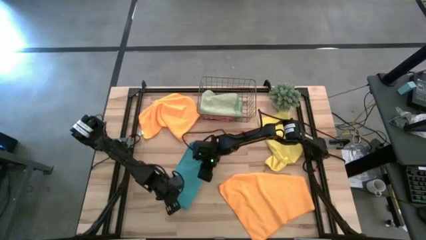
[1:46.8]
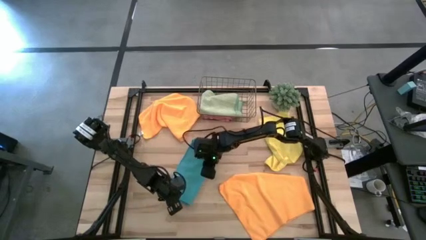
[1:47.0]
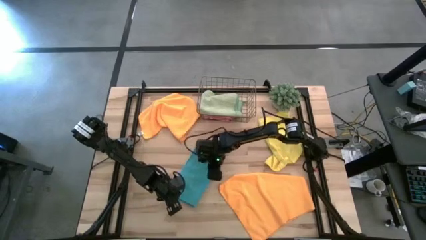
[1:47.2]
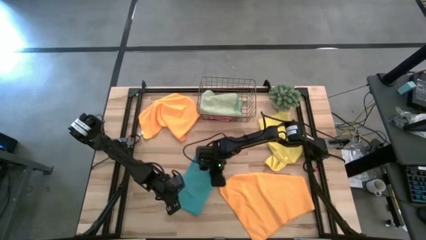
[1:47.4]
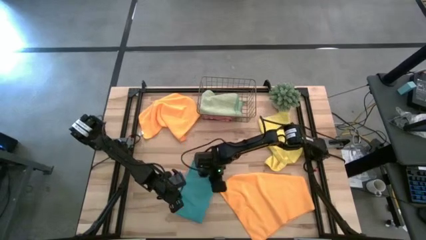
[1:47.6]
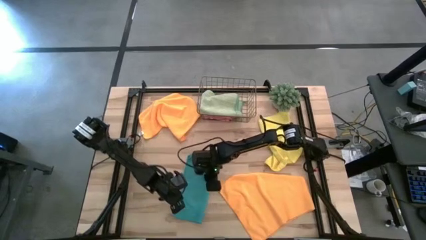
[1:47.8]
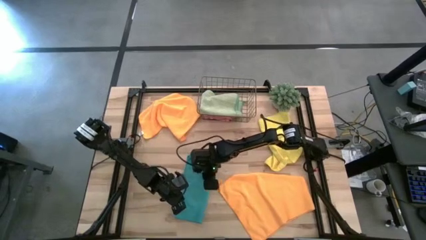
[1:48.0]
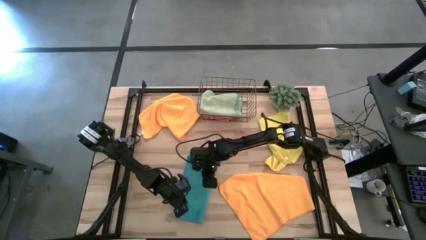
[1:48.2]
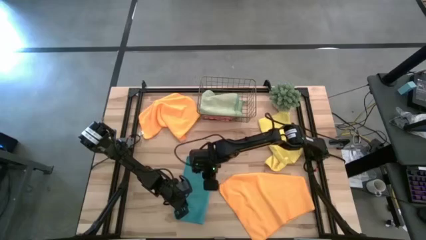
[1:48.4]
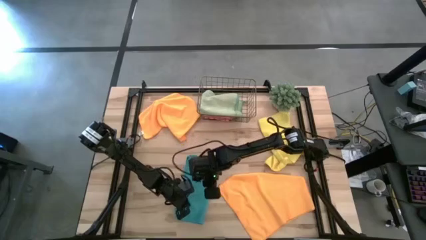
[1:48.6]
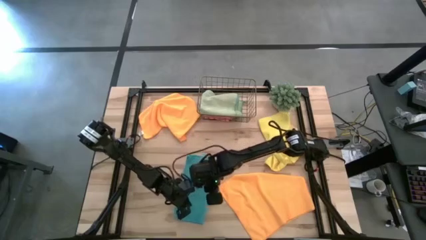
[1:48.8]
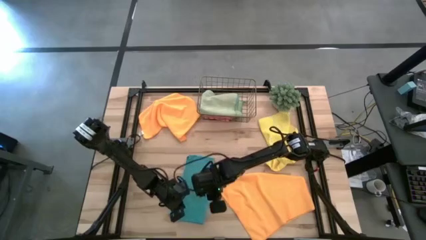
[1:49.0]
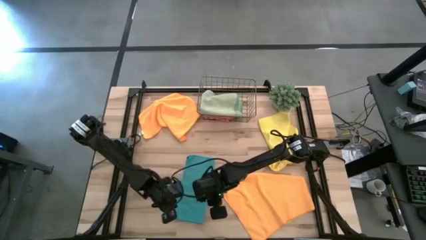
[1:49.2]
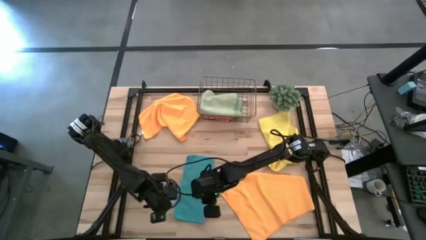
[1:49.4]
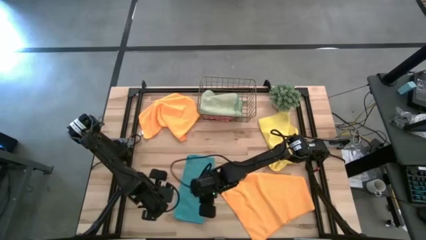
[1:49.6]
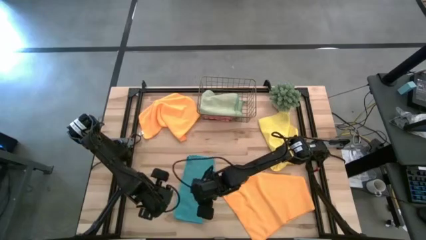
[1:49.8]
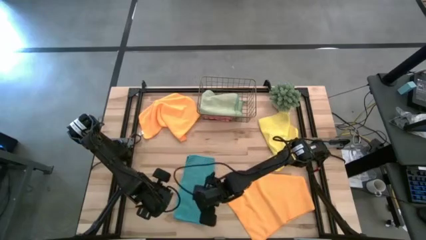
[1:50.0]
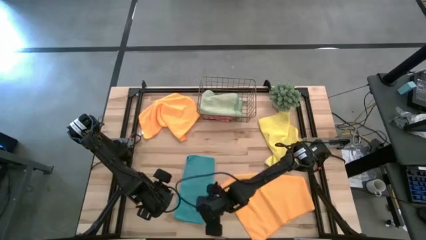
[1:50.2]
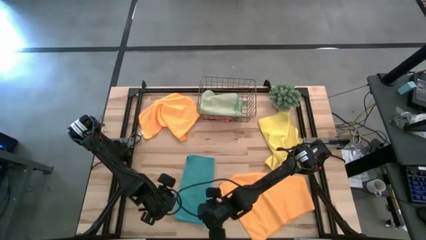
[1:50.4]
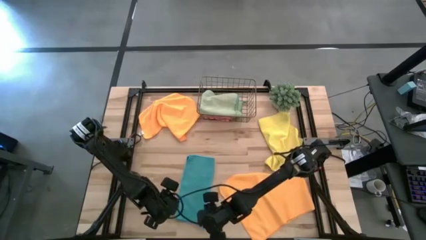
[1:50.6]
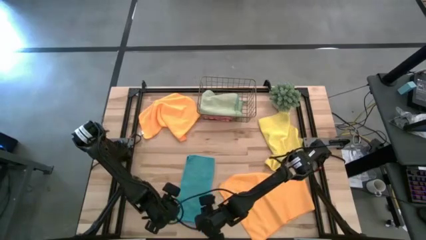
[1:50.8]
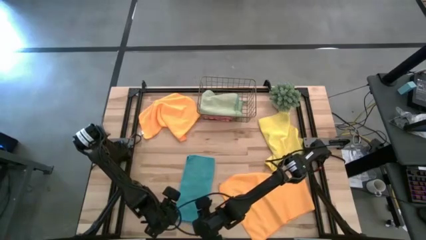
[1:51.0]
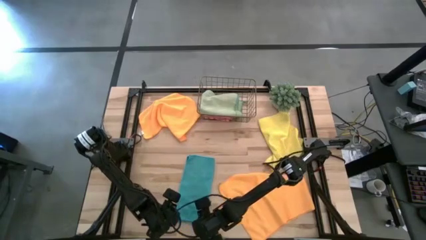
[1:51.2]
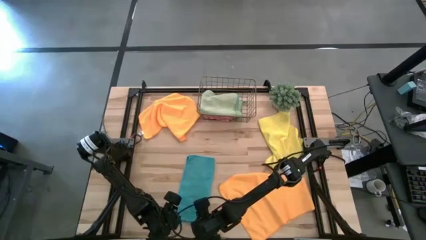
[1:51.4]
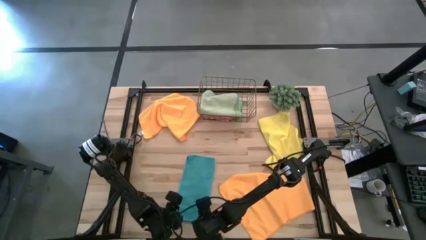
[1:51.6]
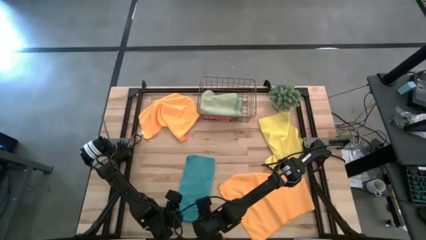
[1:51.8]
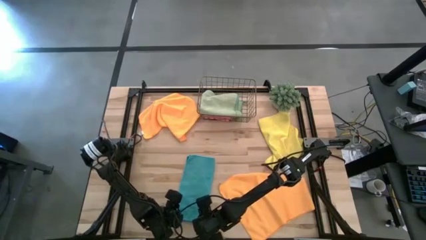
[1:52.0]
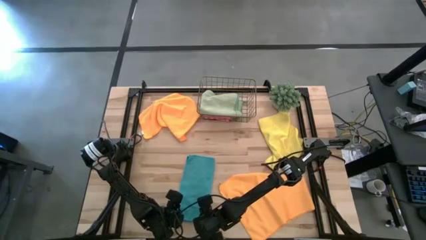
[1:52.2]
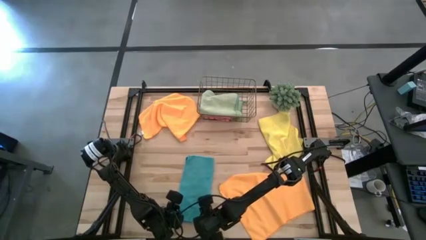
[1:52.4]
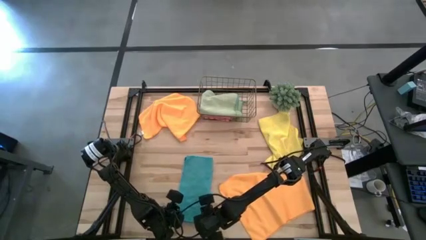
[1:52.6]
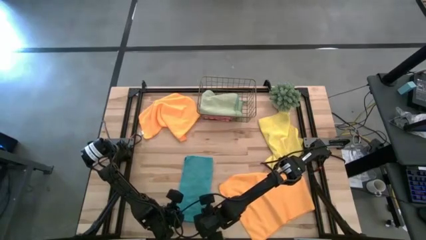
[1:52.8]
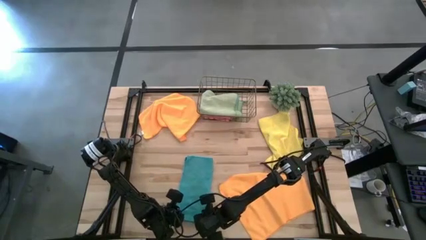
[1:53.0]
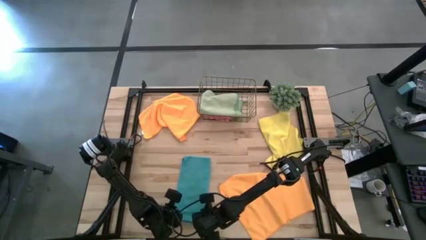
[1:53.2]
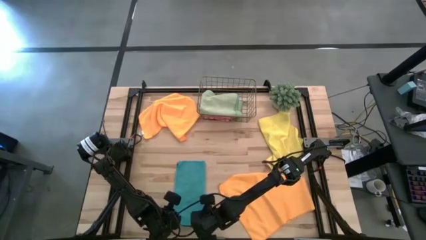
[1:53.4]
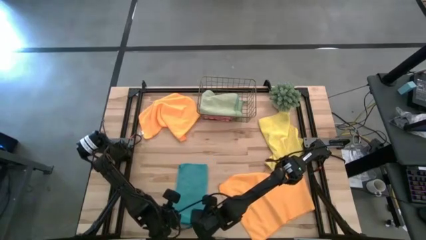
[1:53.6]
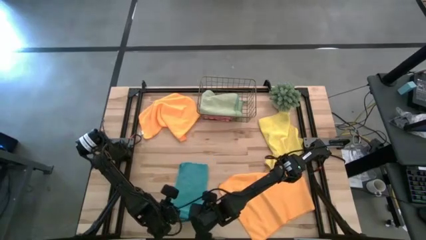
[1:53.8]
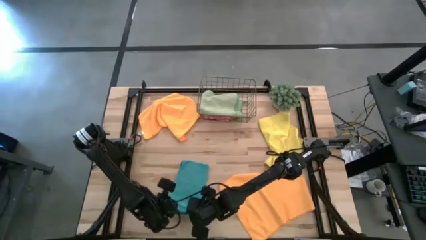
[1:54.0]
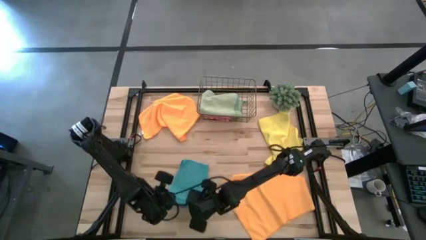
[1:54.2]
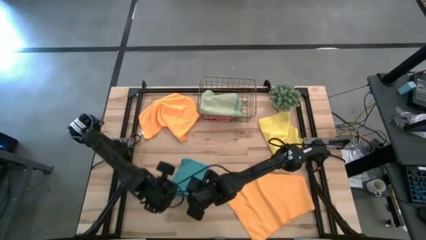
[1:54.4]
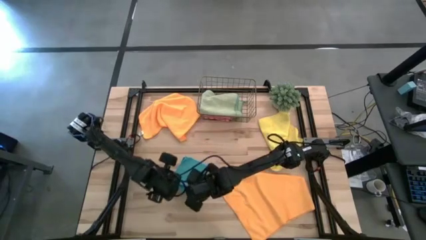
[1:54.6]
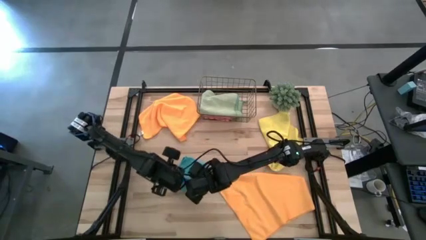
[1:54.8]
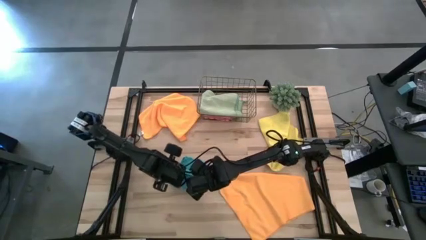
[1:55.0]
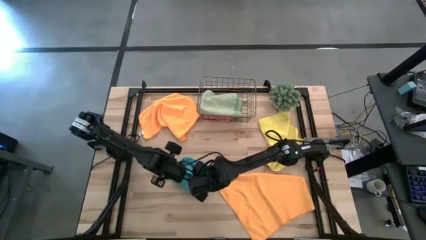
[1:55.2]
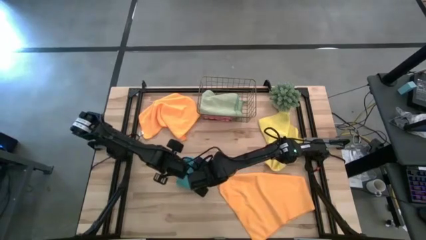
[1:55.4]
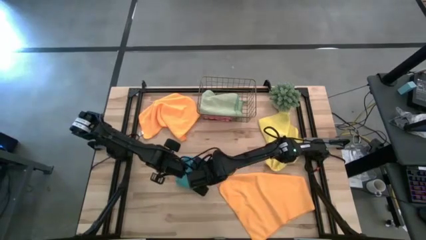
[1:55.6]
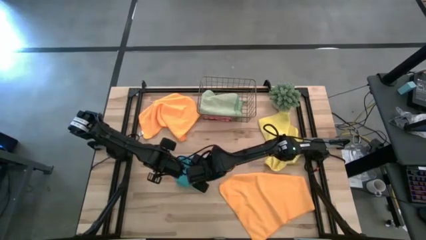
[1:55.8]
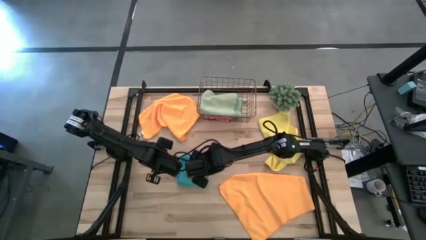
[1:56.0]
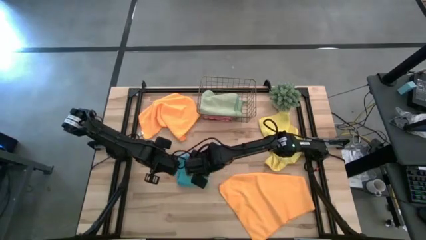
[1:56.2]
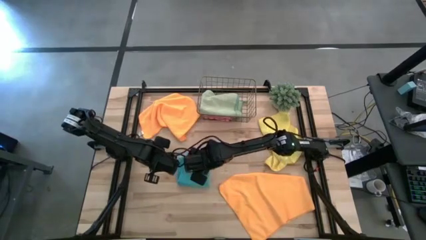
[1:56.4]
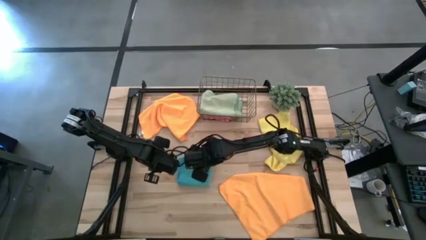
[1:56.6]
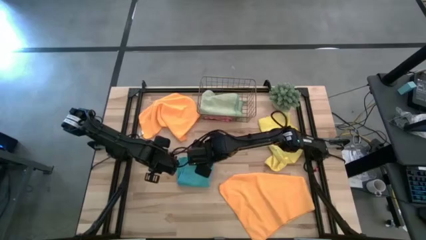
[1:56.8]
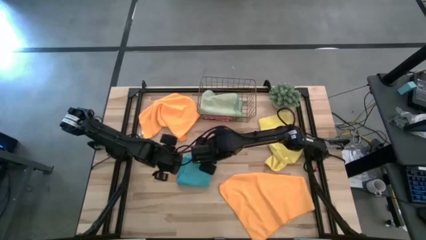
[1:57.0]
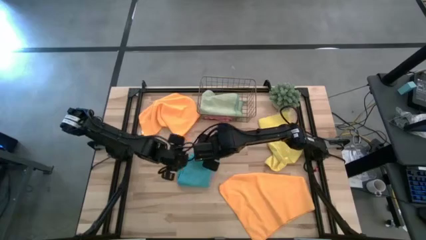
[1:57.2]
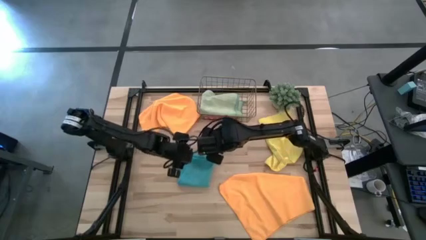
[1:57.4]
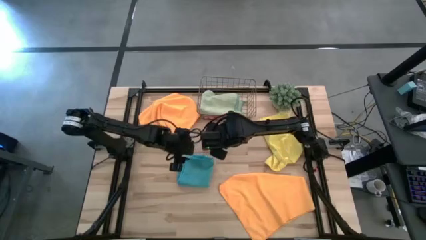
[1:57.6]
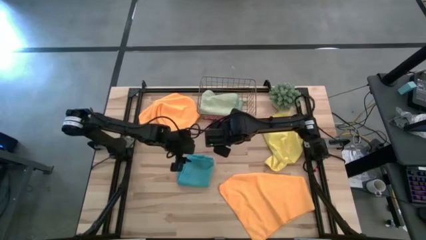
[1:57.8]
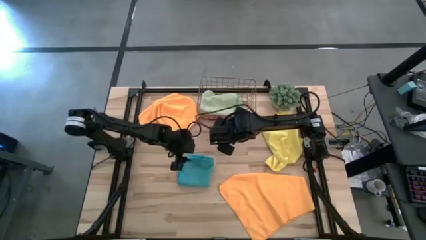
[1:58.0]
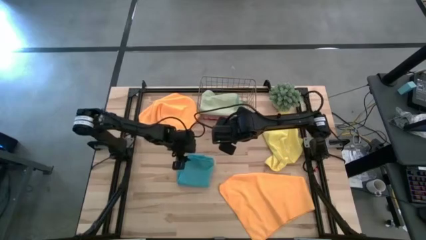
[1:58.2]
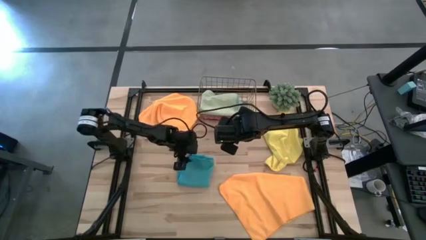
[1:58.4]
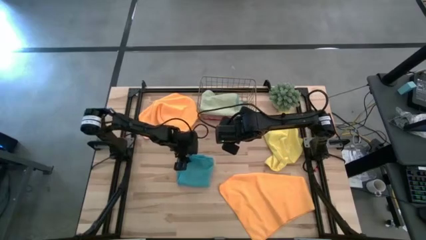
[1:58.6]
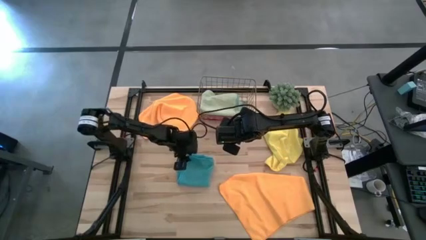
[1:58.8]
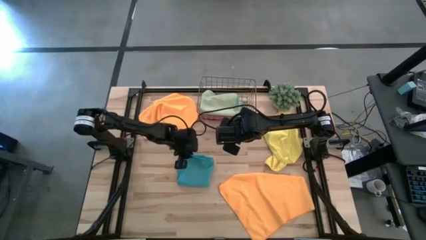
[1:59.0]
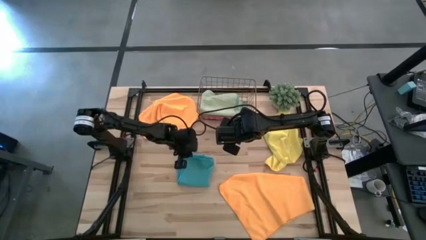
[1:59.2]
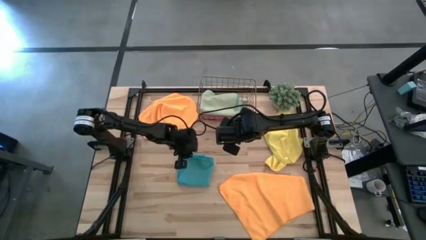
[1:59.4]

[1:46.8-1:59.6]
Task: Fold microfiber towels
Fold the blue microfiber cloth

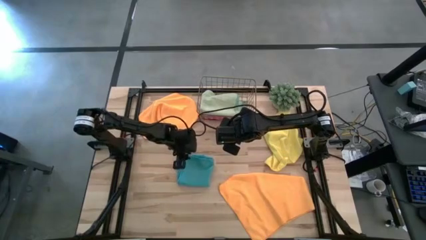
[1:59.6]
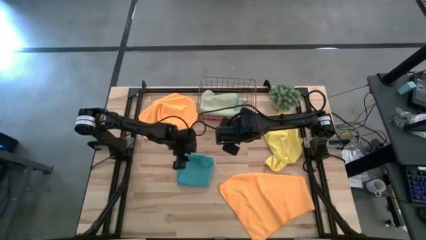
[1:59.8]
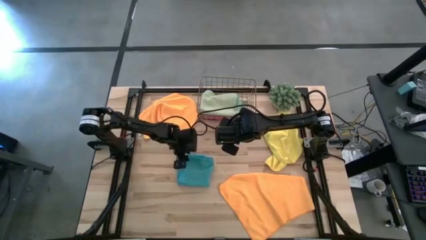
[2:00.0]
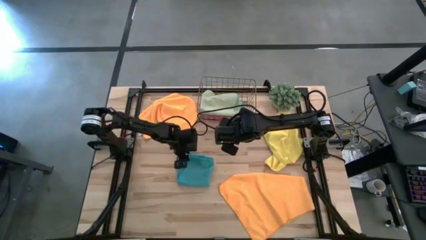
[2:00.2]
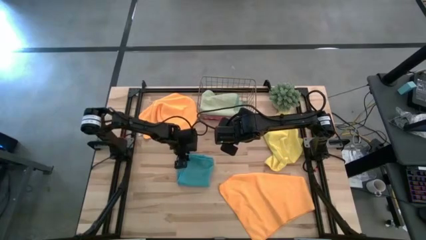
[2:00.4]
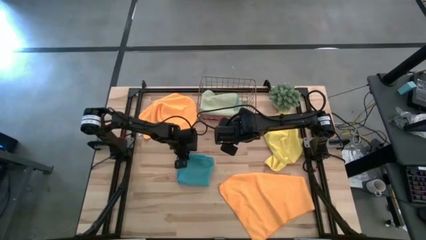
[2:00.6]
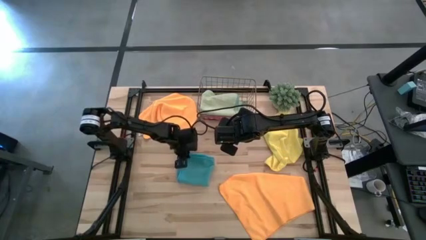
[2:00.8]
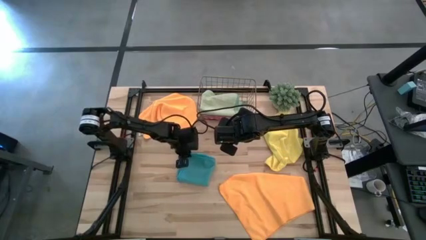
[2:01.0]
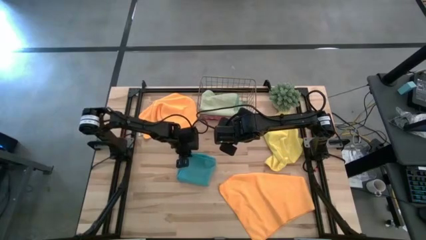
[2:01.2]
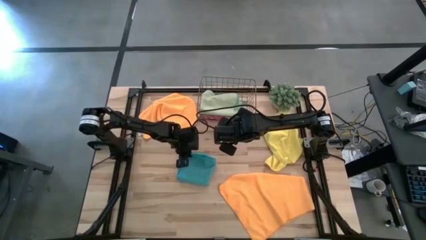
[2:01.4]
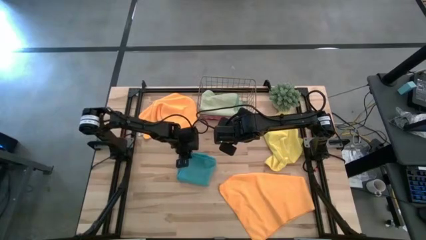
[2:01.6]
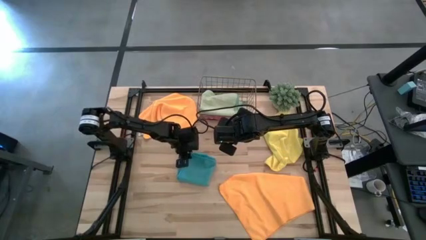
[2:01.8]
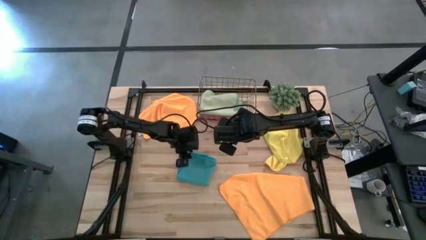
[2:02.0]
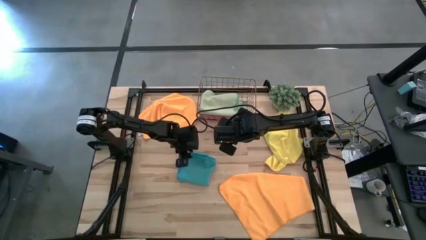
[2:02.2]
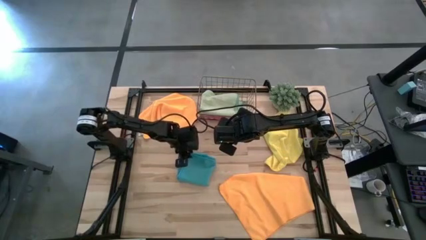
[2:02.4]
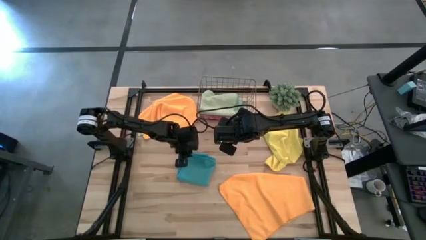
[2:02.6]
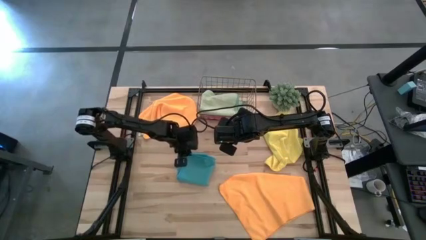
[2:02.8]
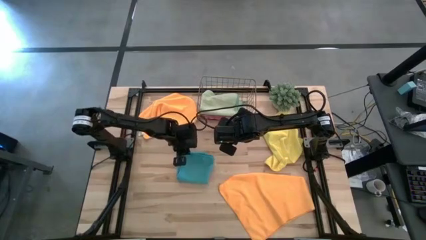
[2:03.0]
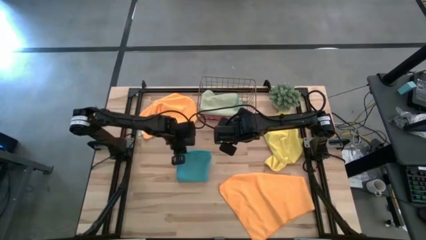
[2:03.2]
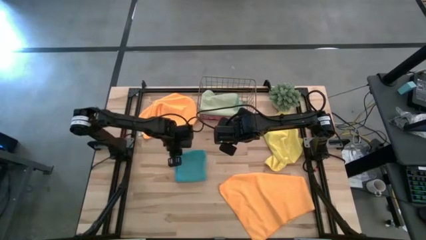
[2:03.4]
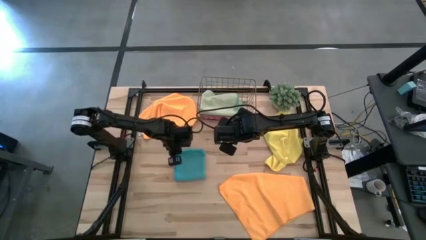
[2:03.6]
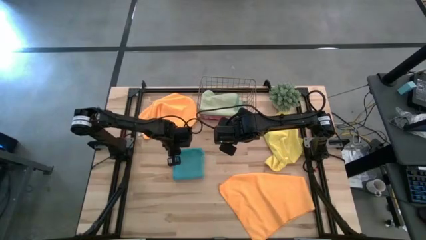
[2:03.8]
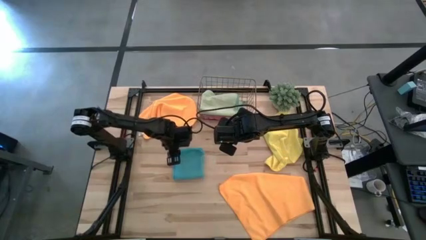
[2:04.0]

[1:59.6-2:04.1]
Fold the blue microfiber cloth
